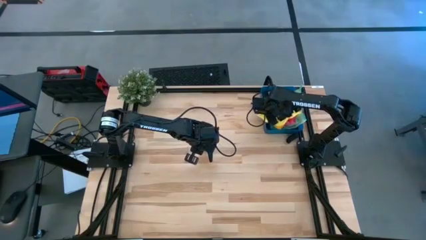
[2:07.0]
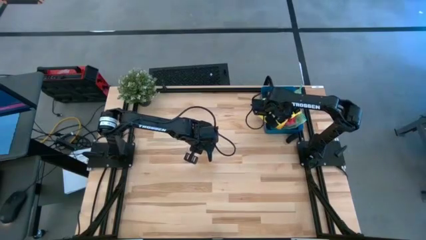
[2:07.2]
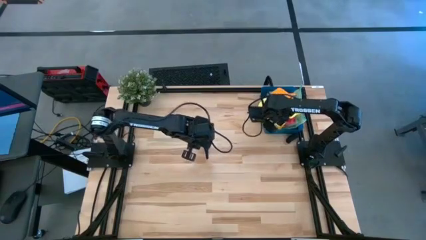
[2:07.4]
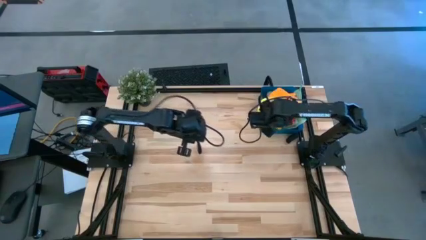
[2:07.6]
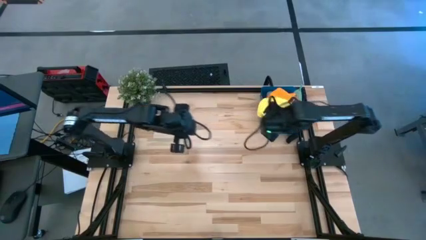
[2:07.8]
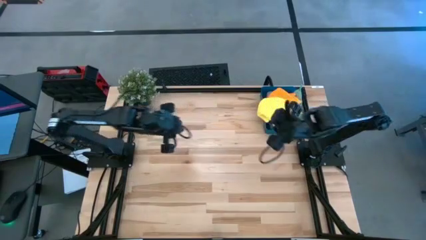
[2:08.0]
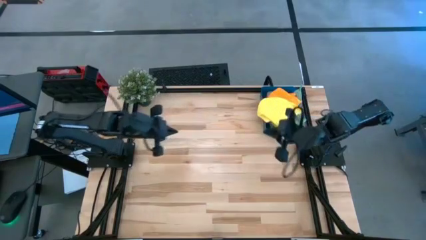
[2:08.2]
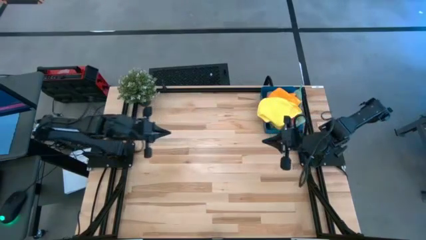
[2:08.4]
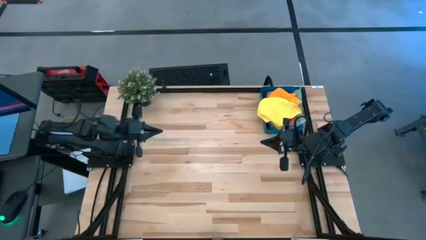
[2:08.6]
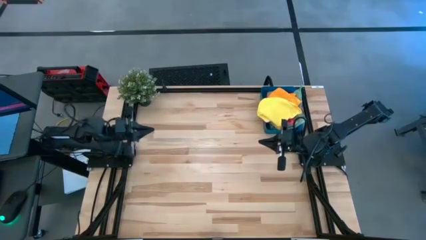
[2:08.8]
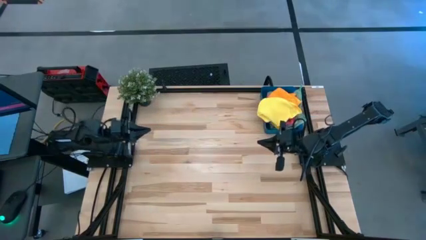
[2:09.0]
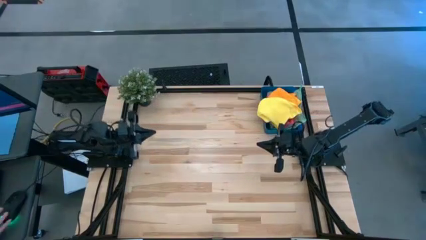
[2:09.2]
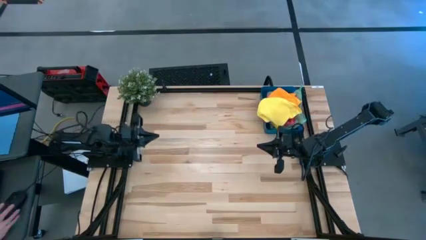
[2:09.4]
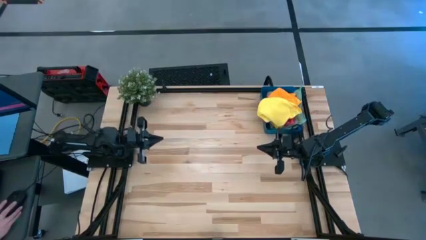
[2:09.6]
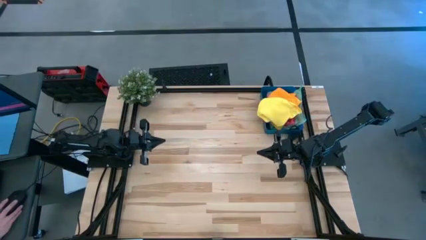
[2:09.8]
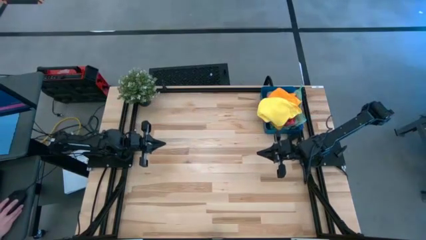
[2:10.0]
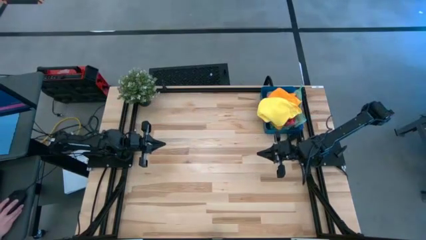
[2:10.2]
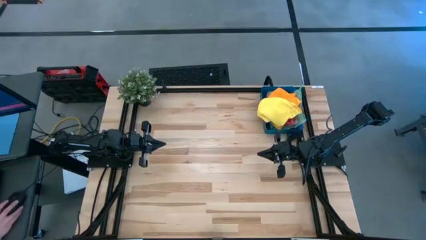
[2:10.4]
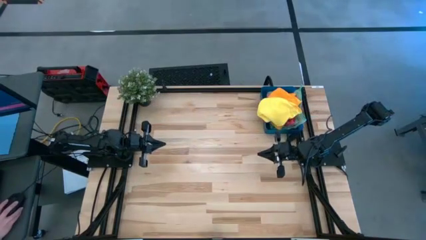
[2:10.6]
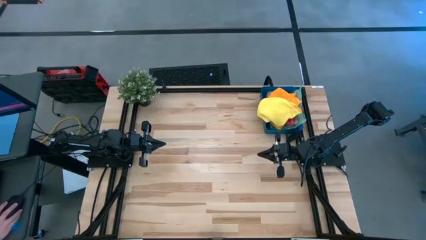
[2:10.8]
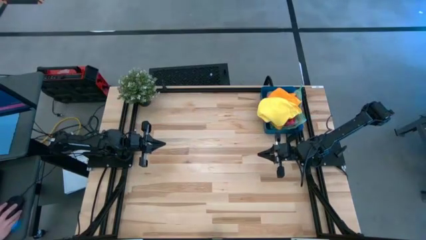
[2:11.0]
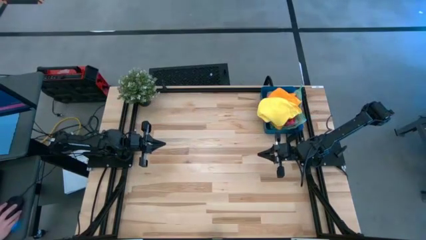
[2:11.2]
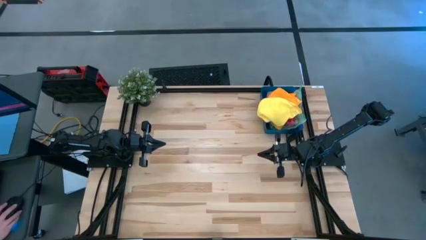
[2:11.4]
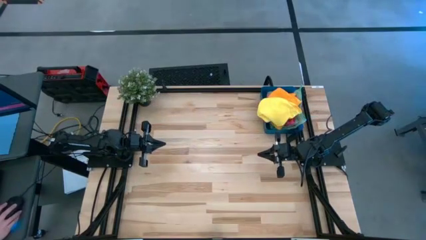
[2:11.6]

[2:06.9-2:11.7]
Task: Fold microfiber towels
Return to Home Position

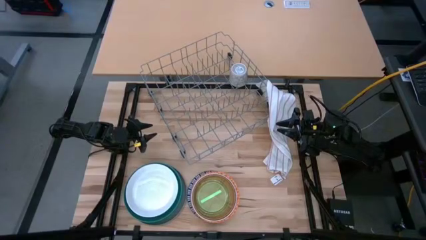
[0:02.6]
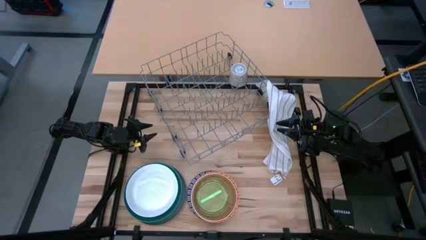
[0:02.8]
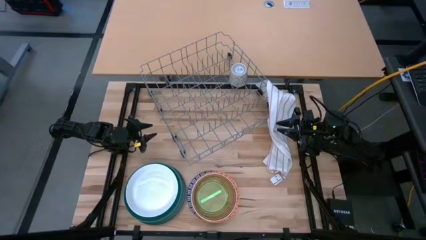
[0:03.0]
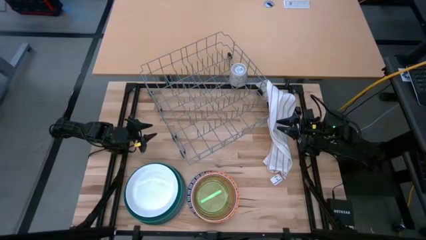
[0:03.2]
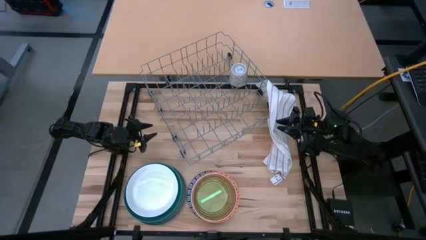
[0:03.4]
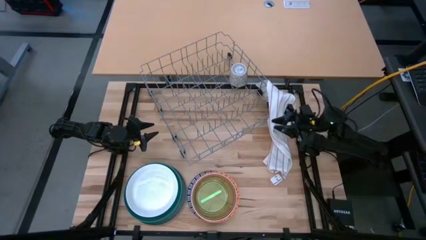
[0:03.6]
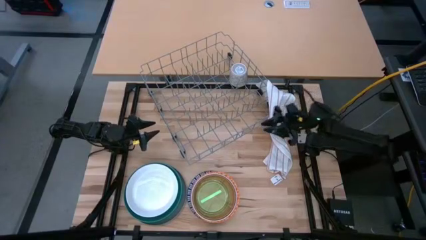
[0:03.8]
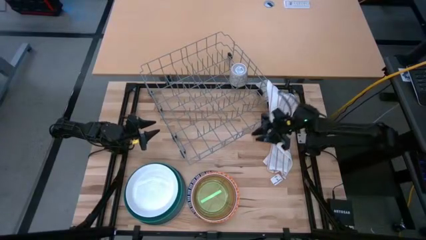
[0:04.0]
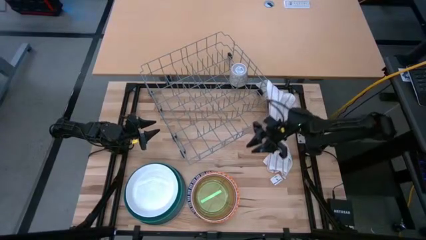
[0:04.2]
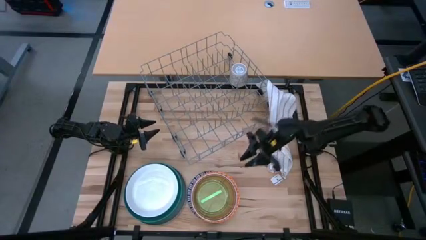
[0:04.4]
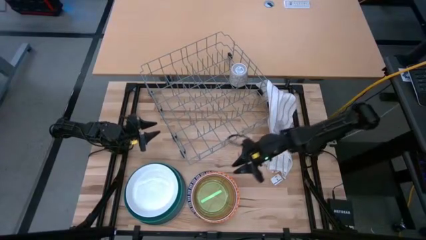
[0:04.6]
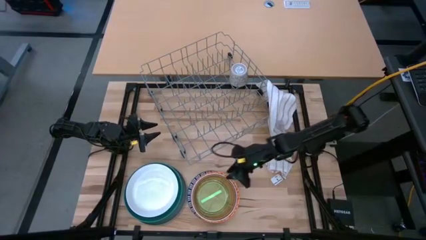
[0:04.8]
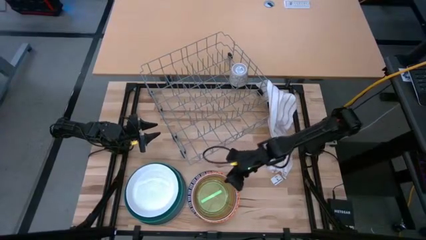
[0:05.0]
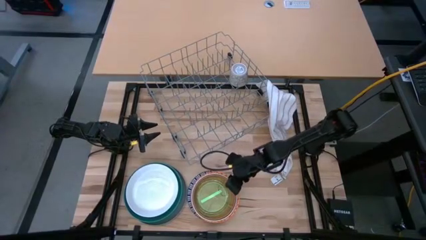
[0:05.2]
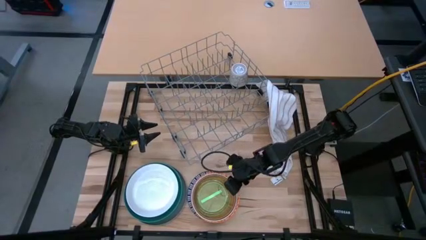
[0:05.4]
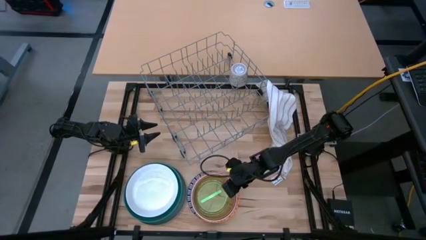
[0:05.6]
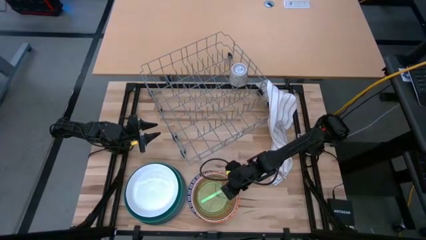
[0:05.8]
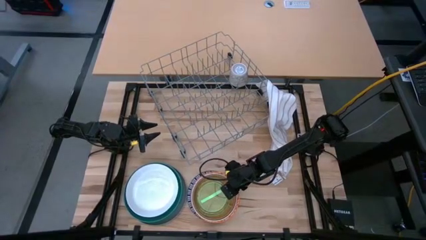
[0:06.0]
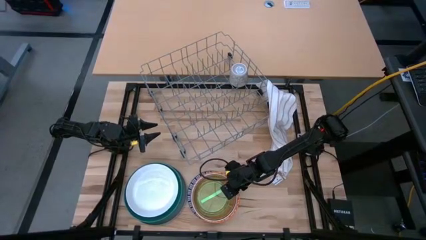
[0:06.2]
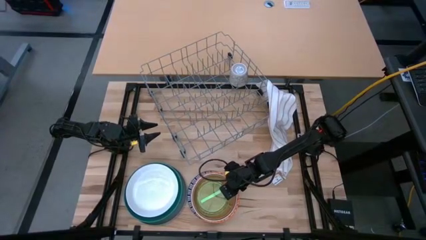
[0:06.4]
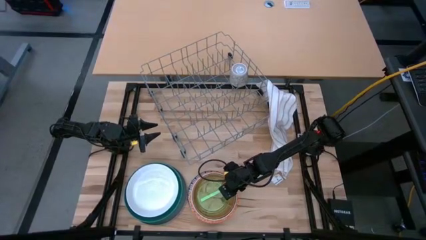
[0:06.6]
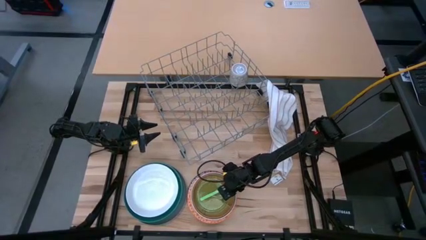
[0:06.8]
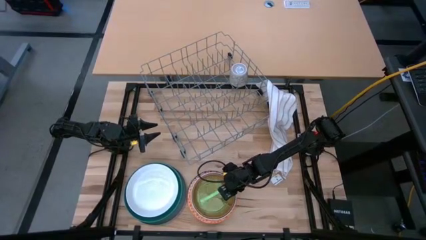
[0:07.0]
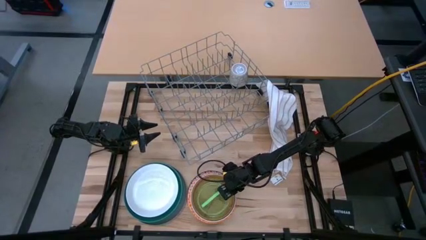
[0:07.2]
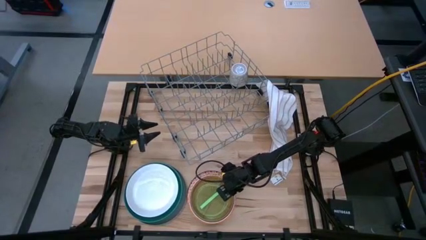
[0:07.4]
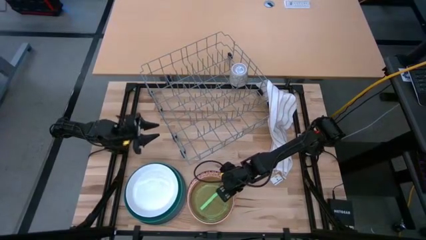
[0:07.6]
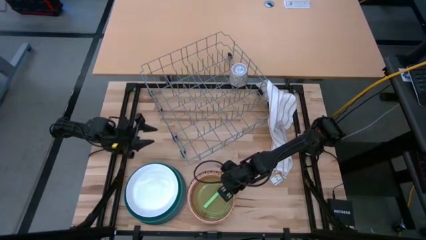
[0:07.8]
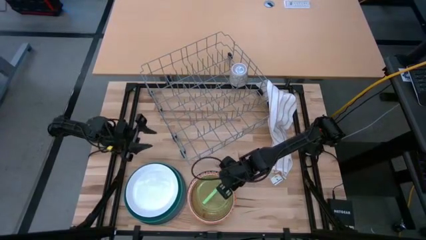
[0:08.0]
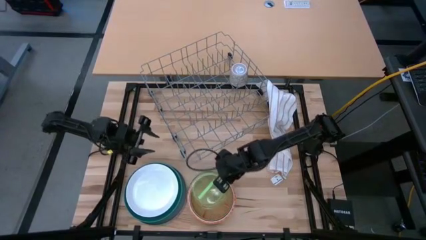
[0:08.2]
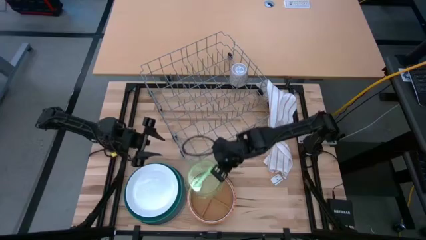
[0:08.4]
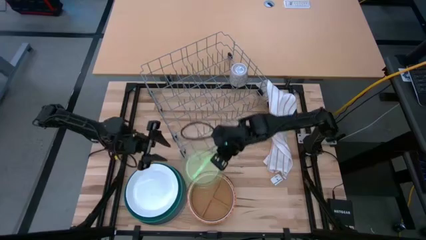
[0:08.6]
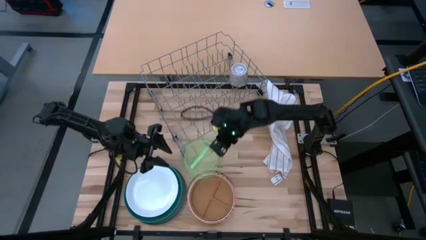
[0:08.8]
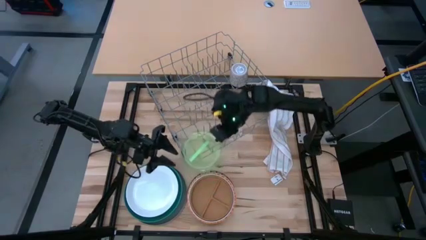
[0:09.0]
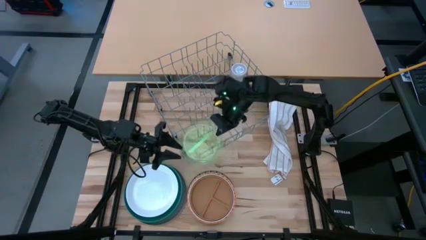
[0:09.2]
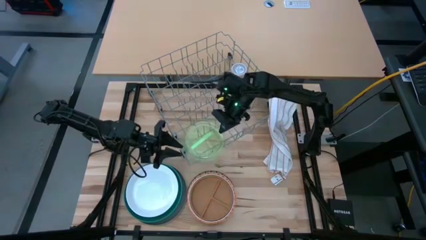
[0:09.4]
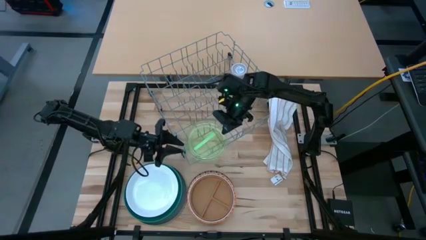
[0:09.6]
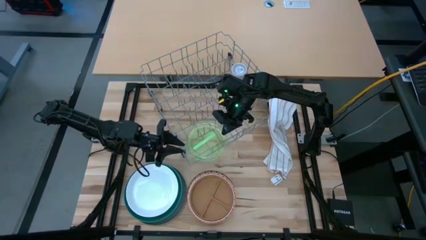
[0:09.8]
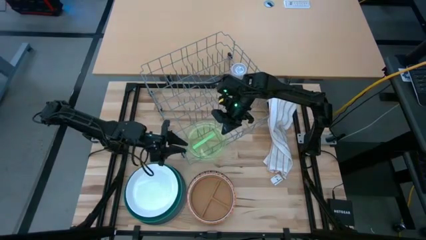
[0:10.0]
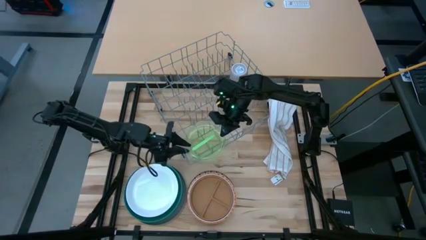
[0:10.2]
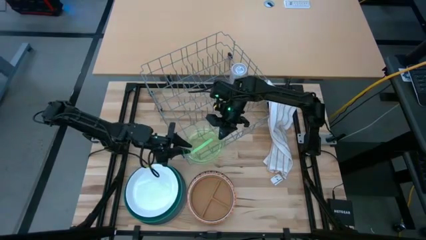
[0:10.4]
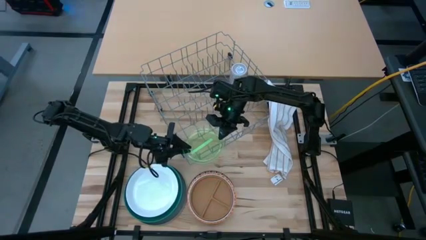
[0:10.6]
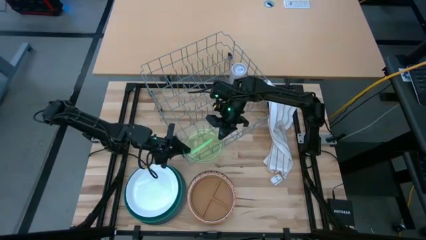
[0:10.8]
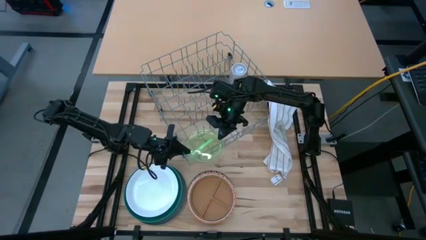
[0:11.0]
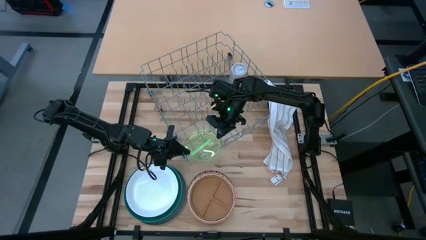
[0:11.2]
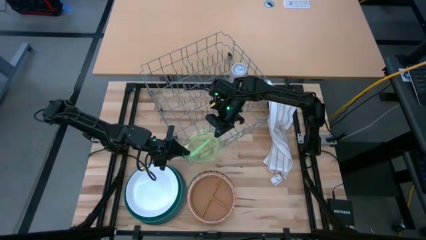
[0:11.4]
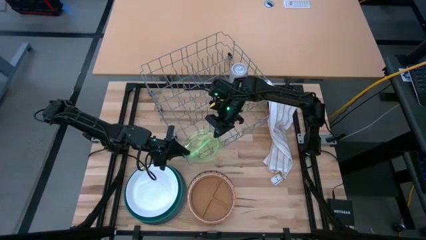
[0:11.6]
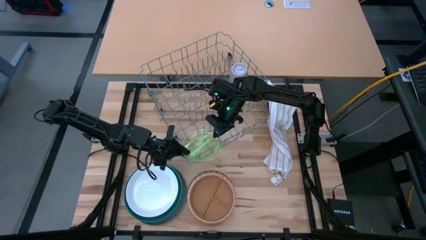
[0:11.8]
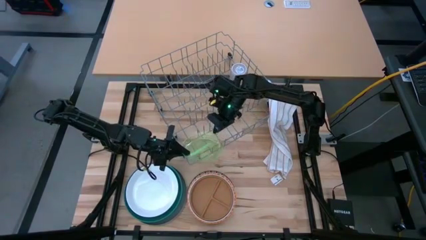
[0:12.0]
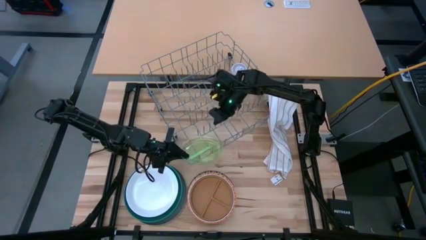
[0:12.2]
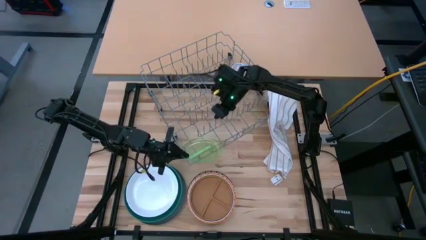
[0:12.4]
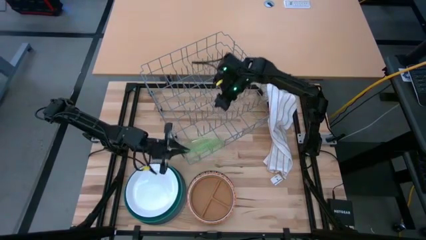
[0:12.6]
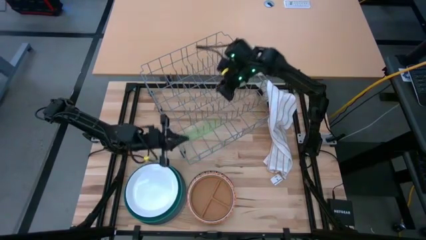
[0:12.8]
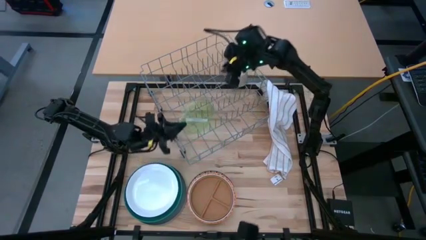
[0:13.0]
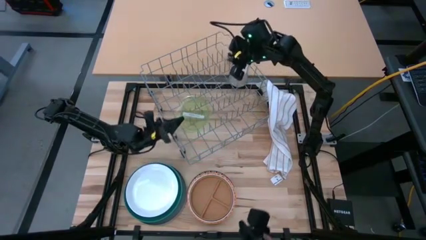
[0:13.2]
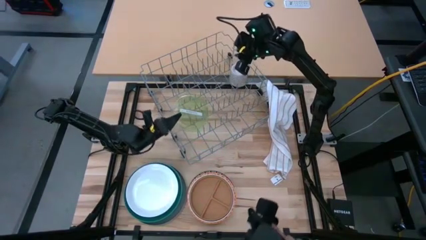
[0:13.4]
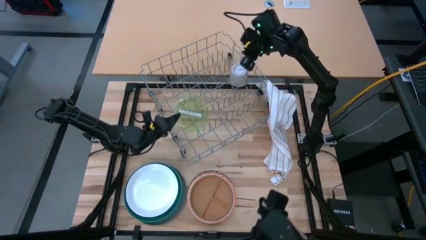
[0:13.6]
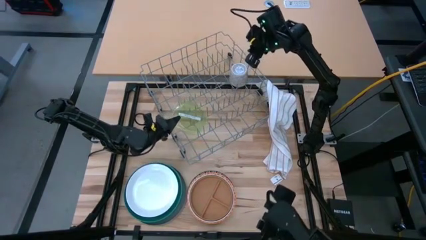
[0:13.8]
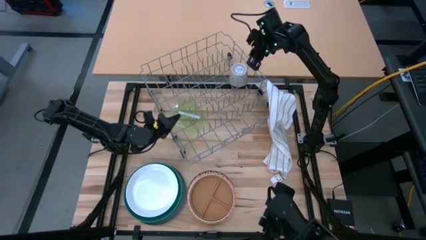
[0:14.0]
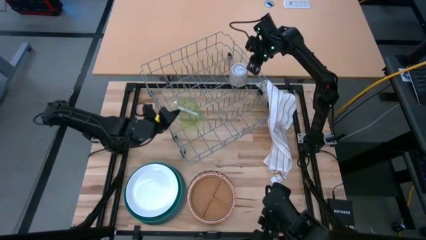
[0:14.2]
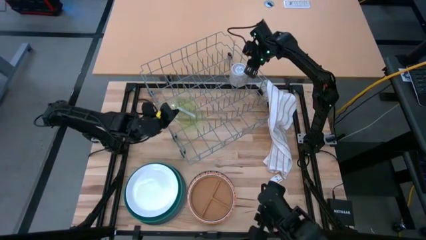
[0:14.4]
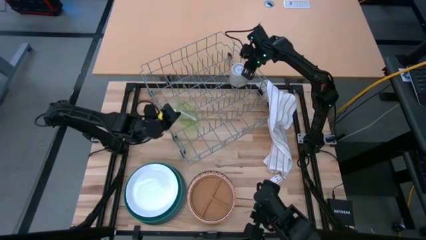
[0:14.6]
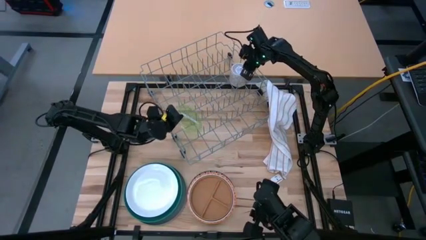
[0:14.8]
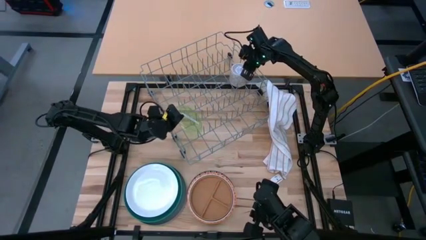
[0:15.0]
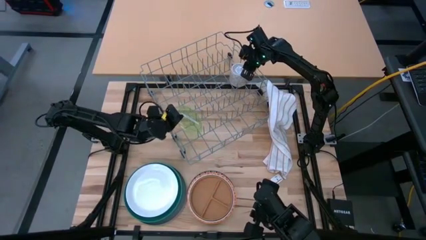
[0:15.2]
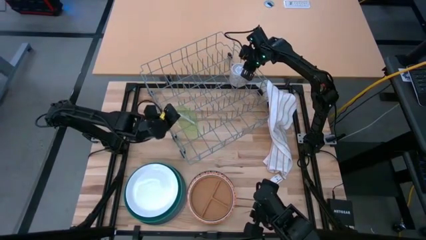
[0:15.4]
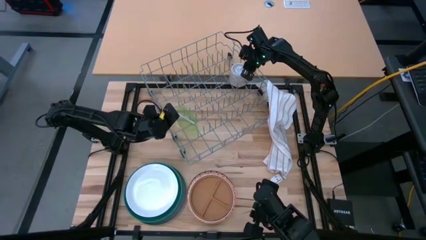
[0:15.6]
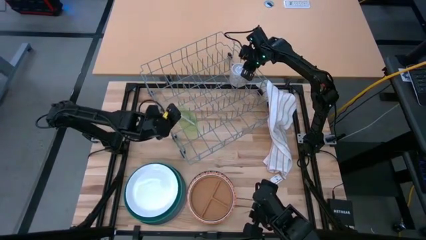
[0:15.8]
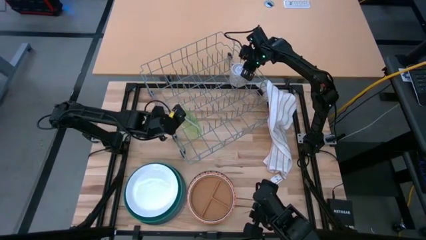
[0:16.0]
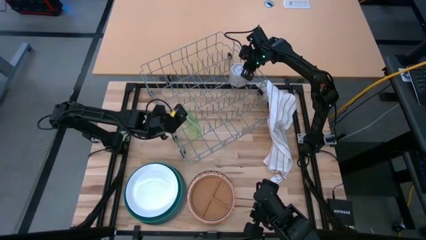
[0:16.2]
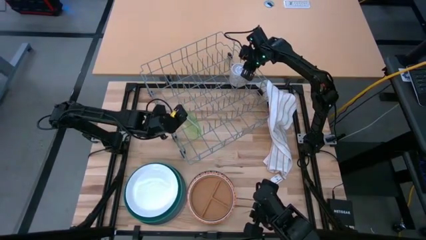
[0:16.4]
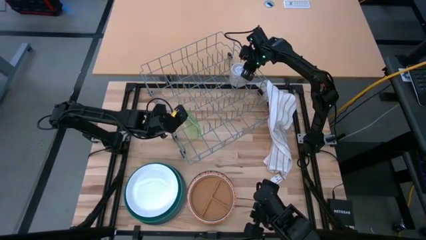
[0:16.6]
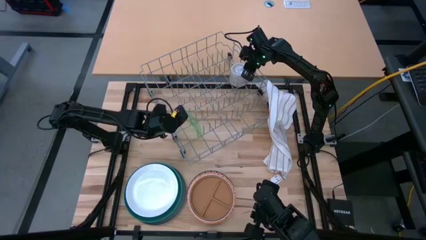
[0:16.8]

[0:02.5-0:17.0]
Task: Sort dishes
Put the green plate into the dish rack
